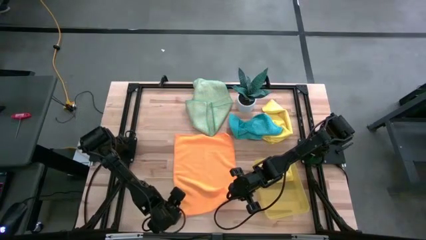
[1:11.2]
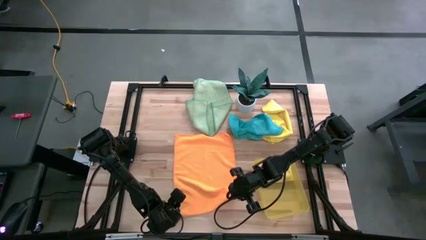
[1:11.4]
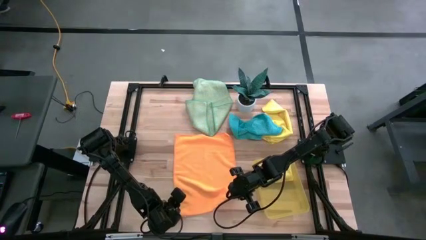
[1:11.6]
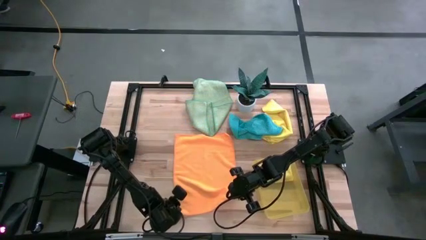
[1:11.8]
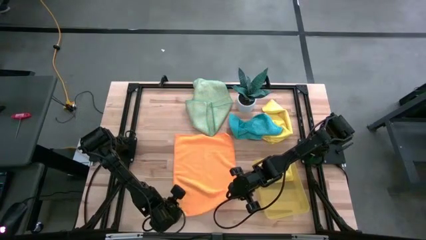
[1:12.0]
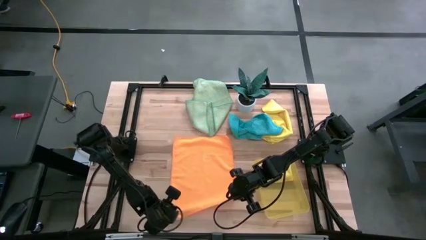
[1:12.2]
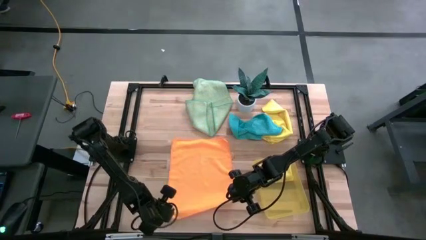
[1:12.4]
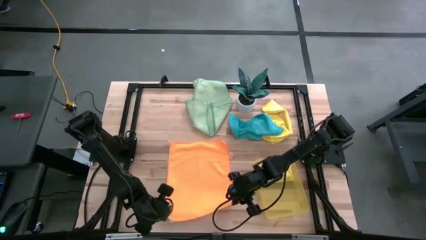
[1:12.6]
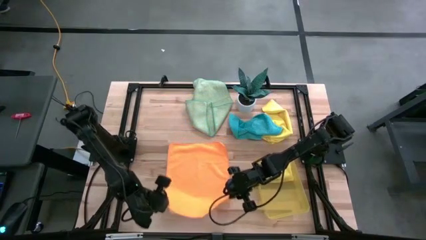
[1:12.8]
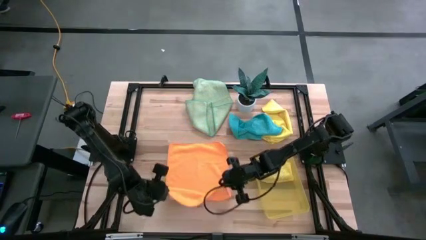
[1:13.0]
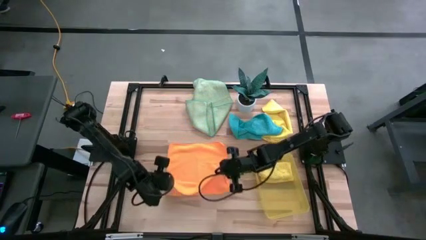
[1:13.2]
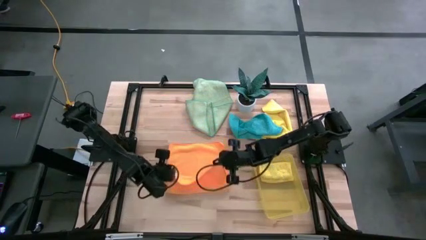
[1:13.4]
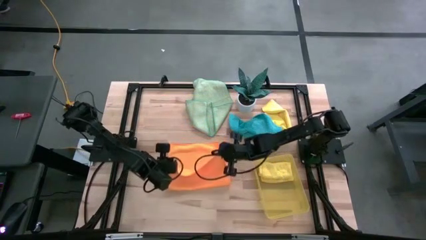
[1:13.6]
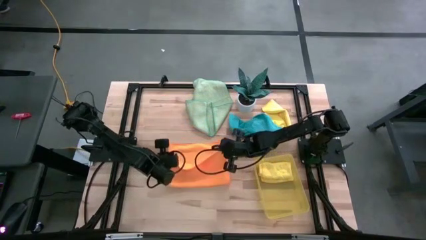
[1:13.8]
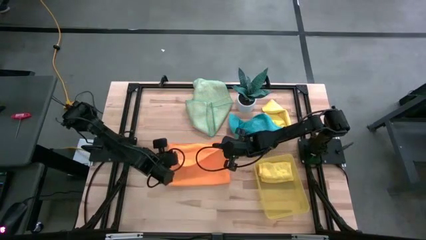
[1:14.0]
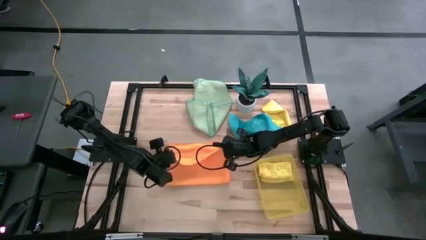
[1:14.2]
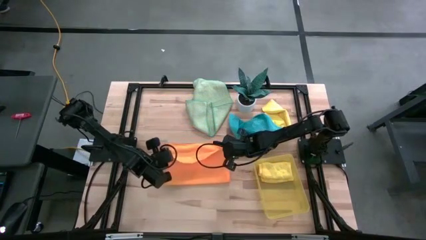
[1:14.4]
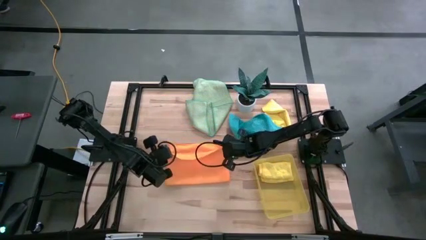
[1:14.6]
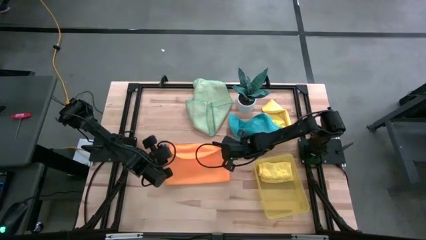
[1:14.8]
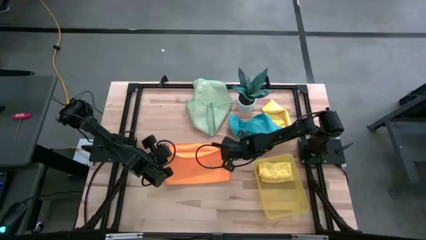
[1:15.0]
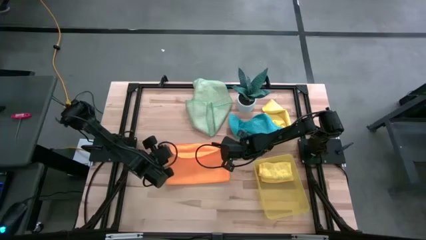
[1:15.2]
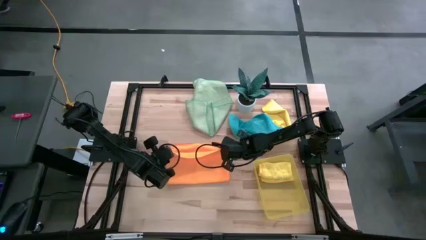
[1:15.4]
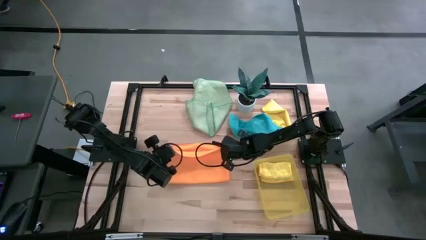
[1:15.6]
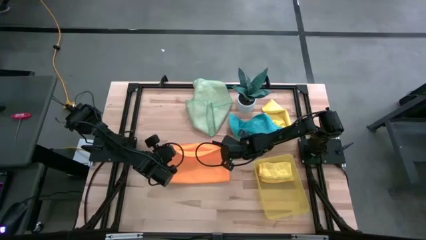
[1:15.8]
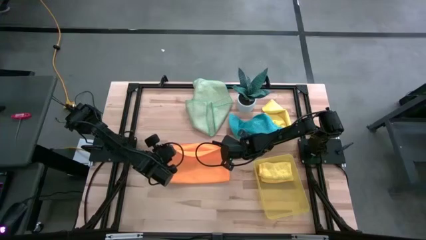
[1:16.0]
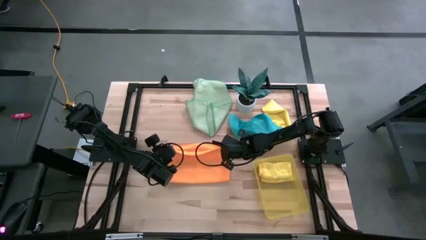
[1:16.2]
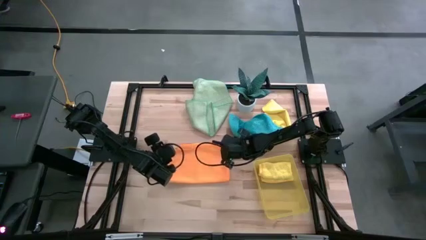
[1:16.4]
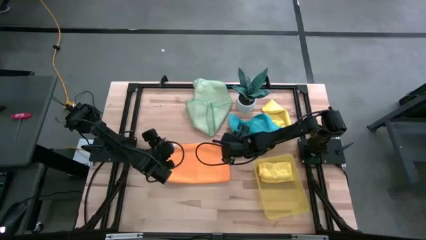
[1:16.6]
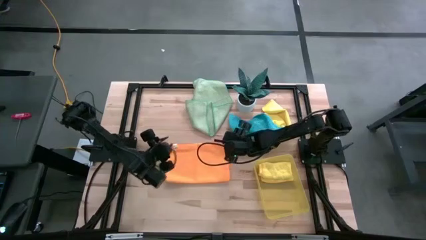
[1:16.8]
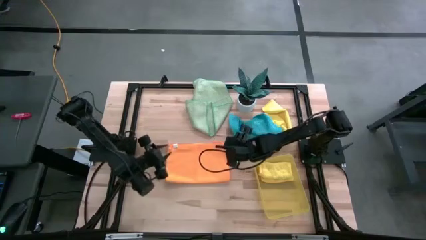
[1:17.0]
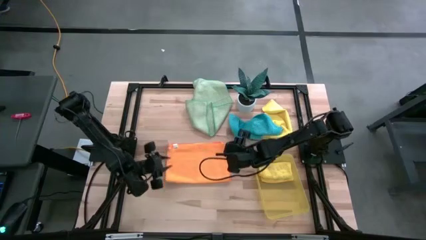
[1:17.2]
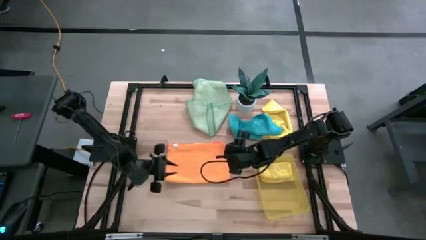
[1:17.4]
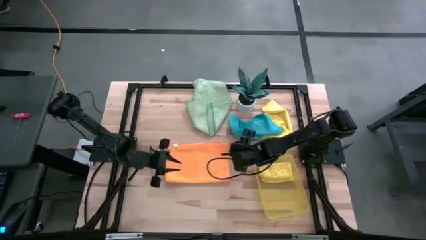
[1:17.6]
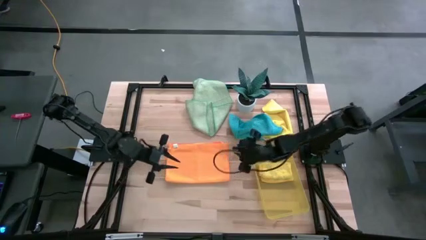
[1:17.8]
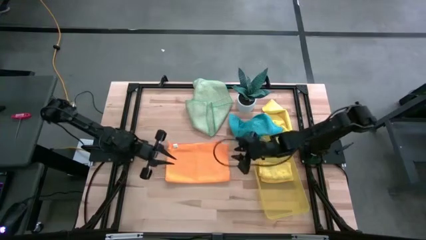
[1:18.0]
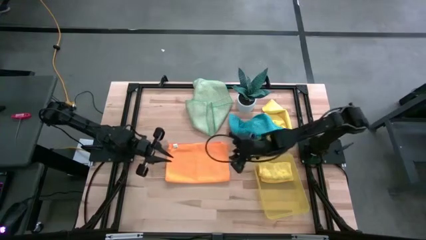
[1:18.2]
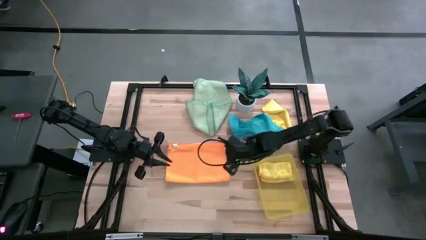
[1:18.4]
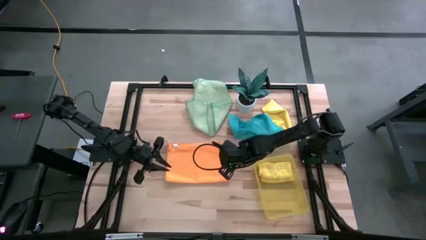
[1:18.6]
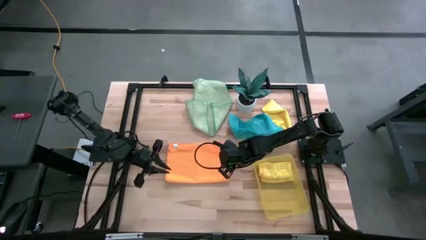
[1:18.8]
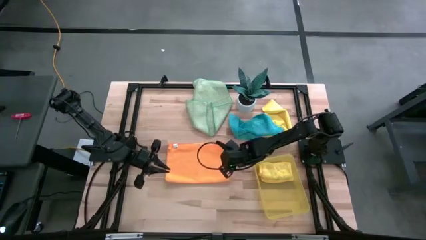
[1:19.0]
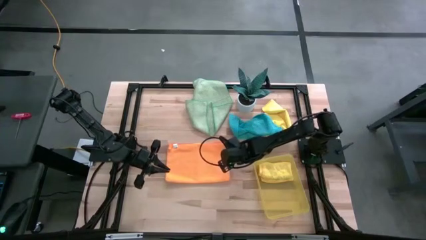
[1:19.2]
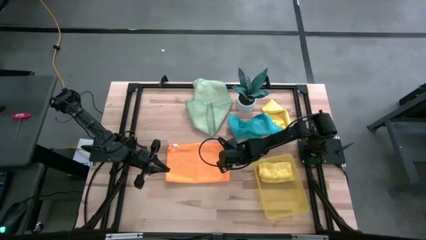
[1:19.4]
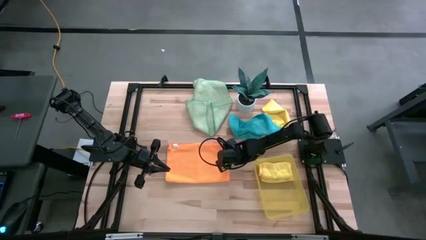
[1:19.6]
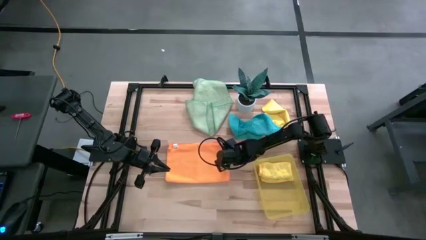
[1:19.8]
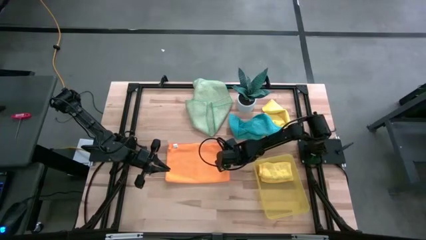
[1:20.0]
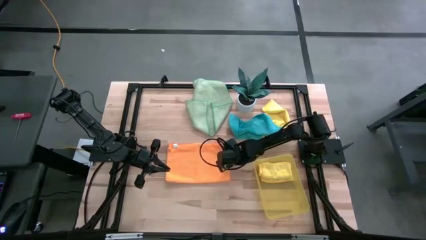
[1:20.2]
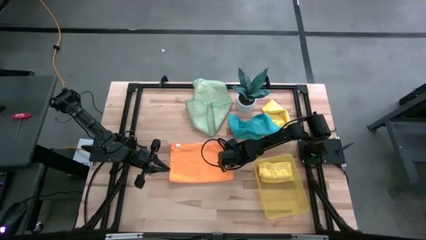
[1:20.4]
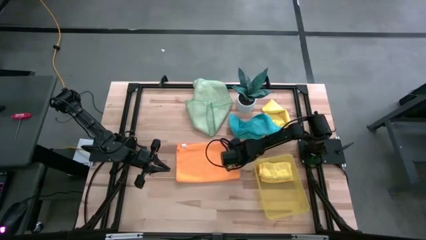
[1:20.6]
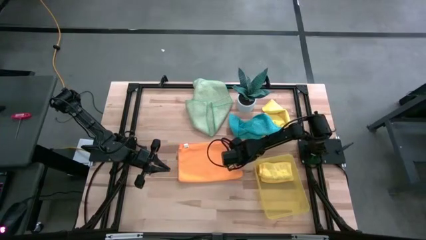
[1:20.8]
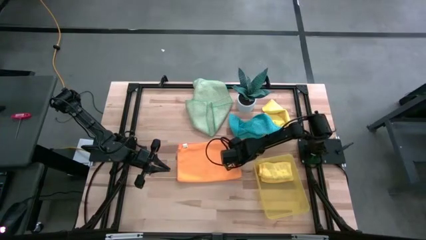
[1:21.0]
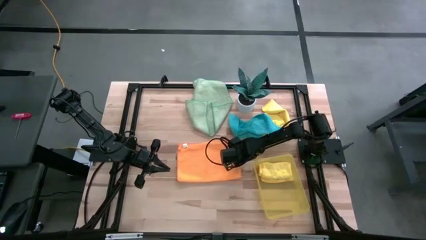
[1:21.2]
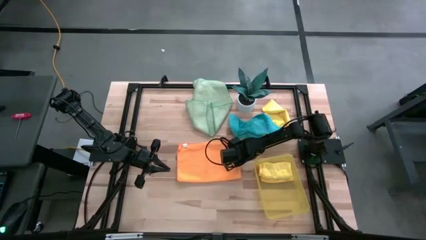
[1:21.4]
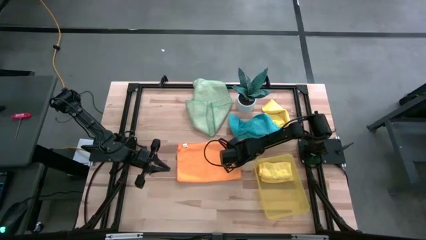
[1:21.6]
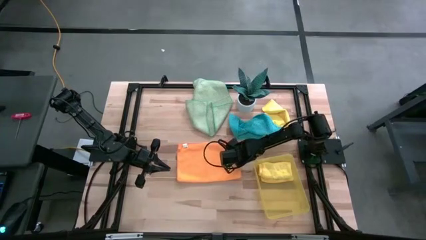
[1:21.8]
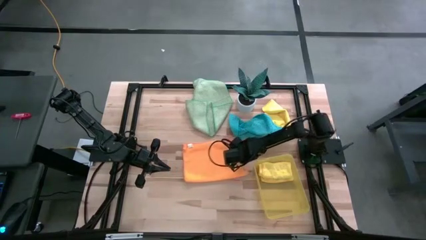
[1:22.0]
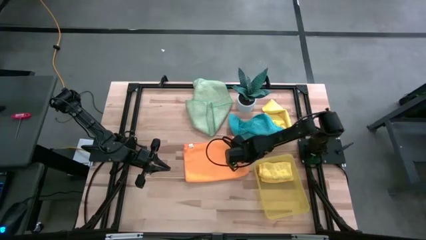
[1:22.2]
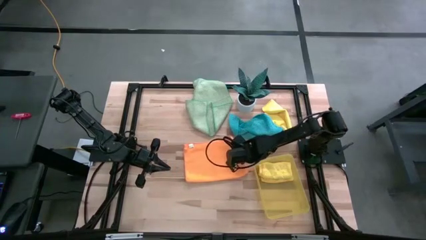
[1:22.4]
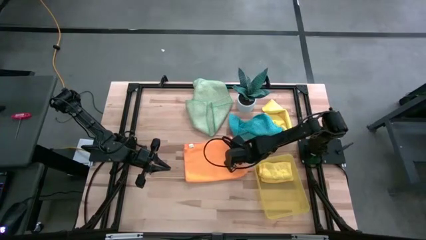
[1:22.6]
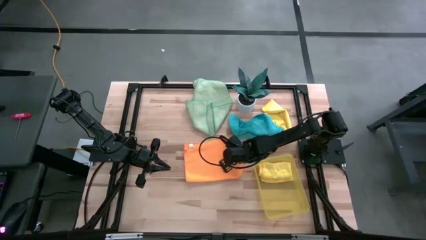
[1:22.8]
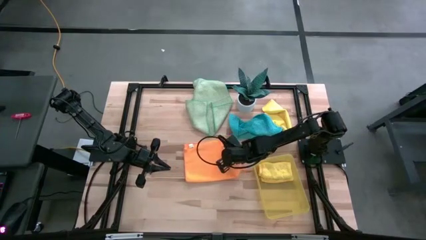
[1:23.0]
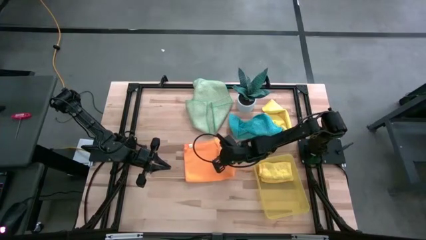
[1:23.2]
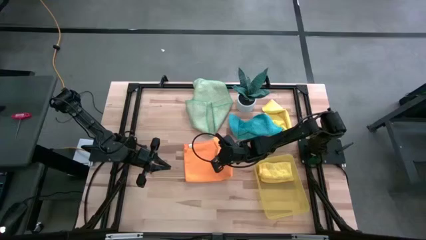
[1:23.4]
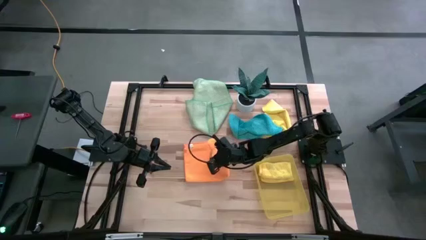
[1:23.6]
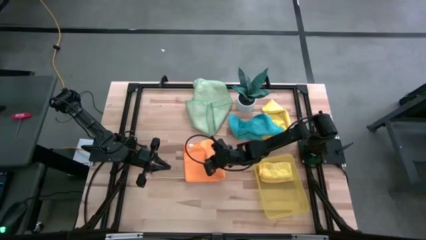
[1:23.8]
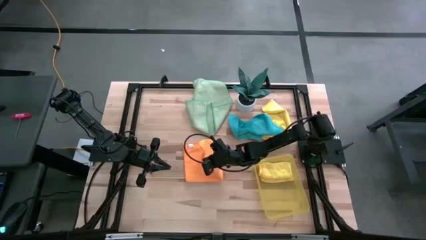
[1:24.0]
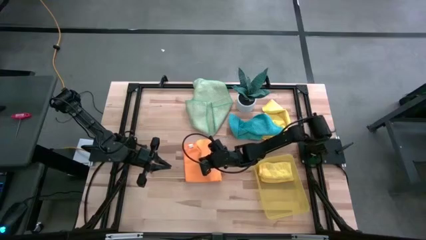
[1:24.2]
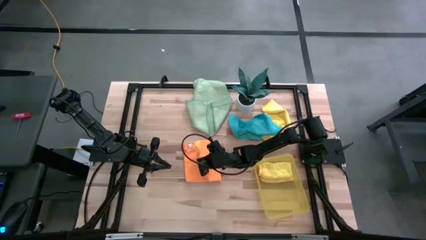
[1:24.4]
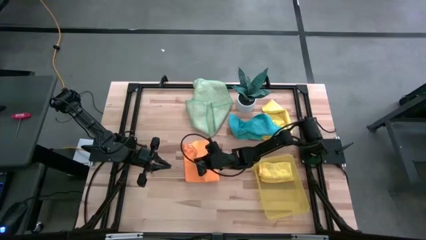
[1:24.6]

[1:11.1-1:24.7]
Task: Fold microfiber towels
Fold the orange microfiber cloth
